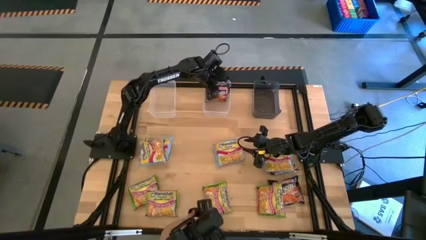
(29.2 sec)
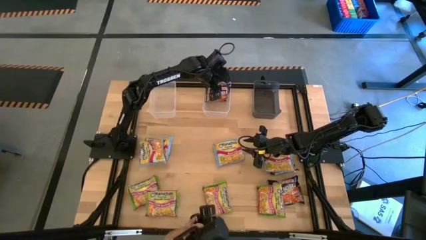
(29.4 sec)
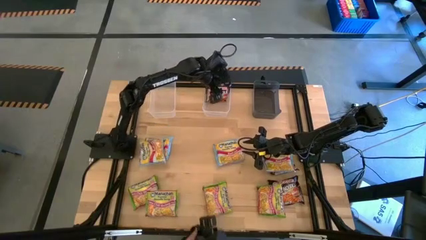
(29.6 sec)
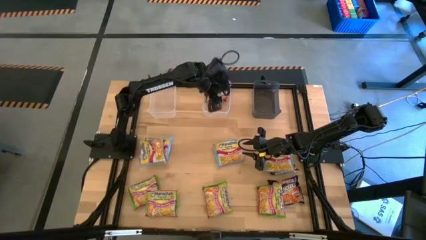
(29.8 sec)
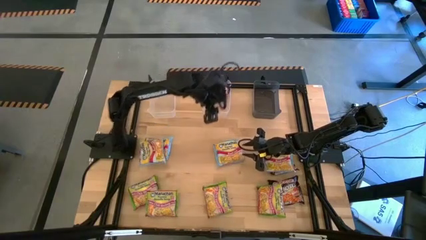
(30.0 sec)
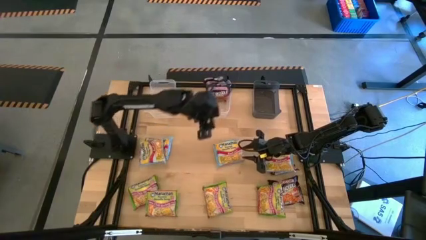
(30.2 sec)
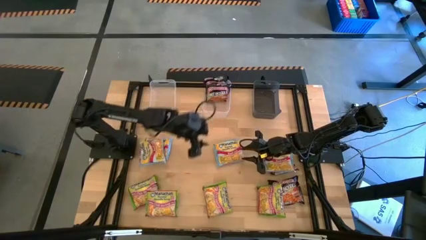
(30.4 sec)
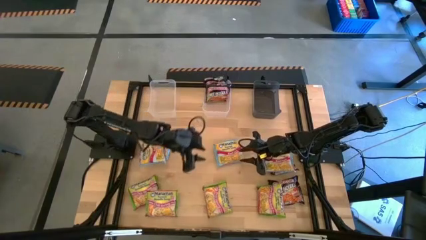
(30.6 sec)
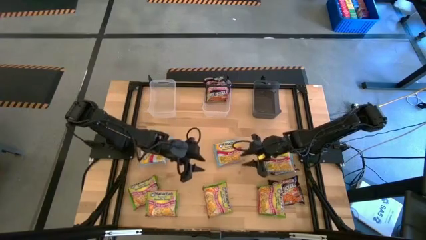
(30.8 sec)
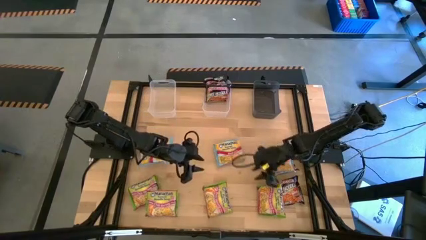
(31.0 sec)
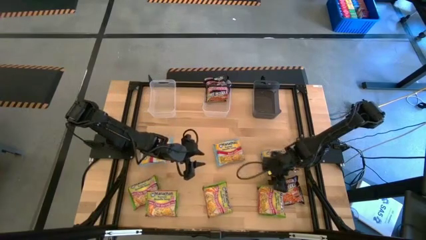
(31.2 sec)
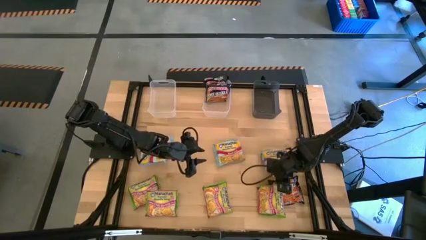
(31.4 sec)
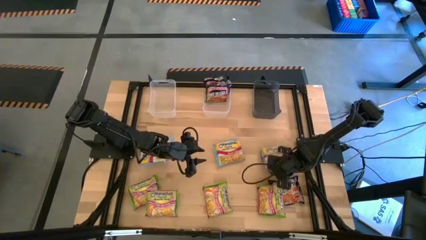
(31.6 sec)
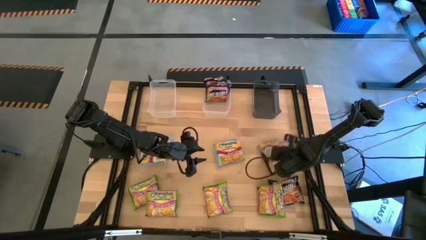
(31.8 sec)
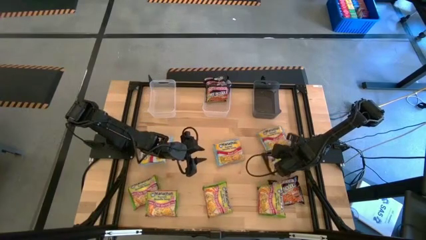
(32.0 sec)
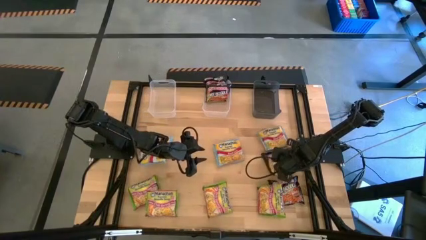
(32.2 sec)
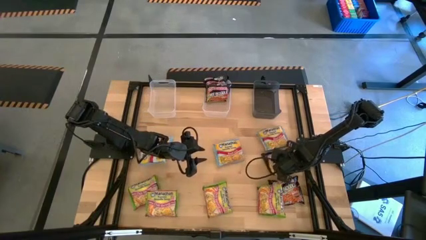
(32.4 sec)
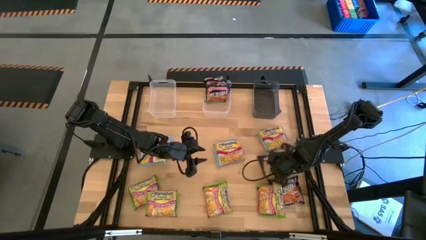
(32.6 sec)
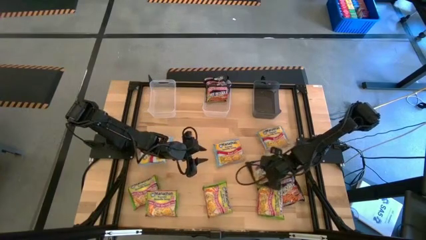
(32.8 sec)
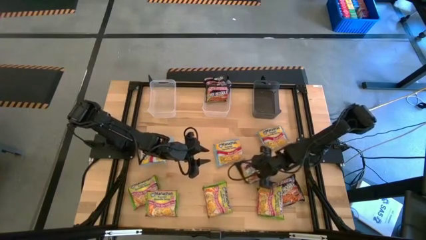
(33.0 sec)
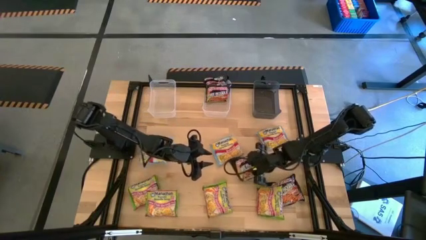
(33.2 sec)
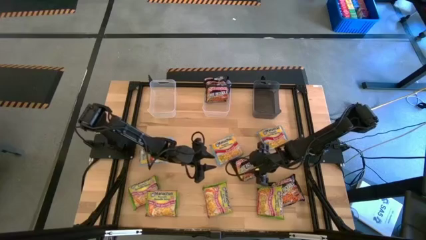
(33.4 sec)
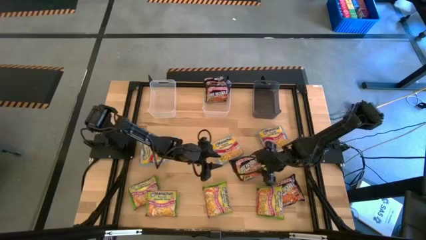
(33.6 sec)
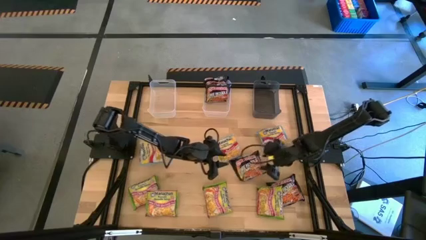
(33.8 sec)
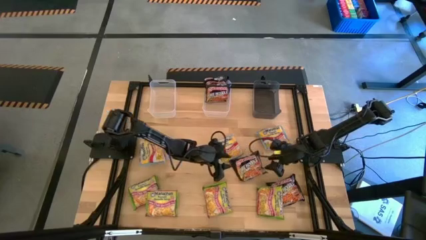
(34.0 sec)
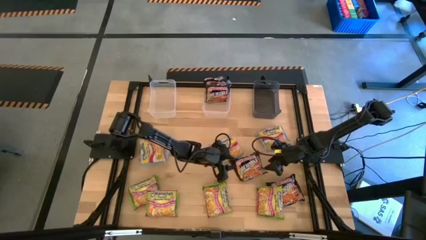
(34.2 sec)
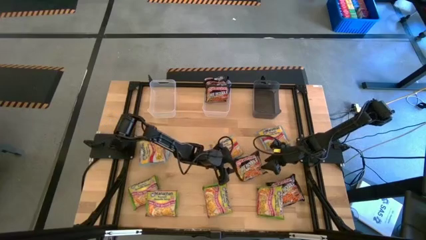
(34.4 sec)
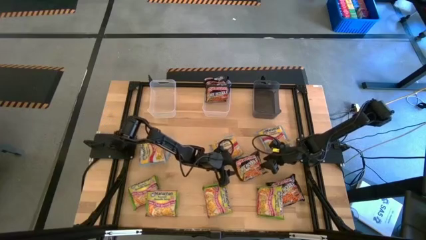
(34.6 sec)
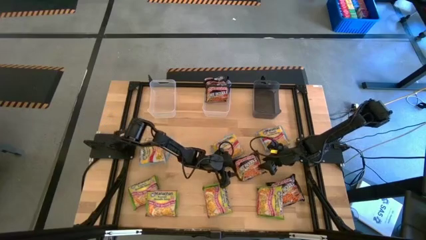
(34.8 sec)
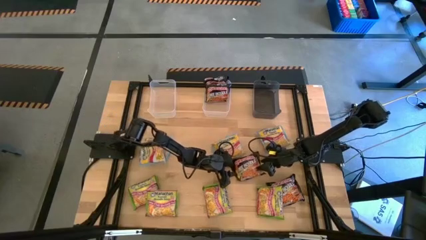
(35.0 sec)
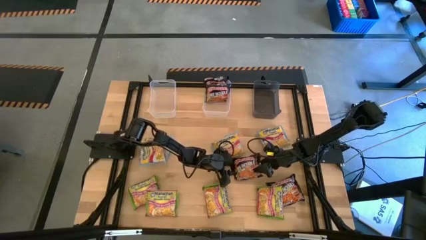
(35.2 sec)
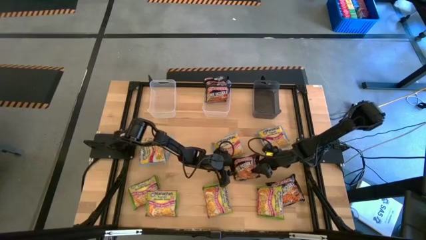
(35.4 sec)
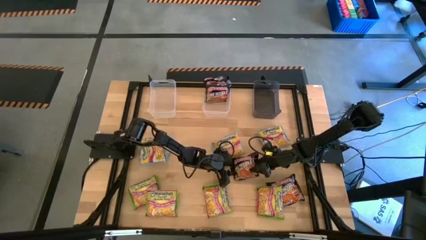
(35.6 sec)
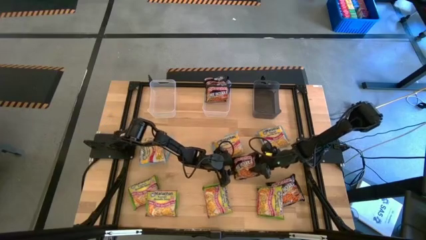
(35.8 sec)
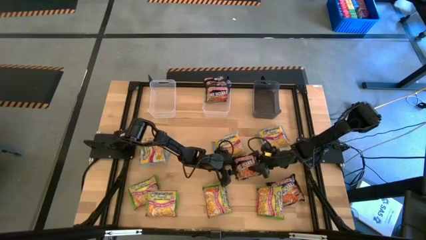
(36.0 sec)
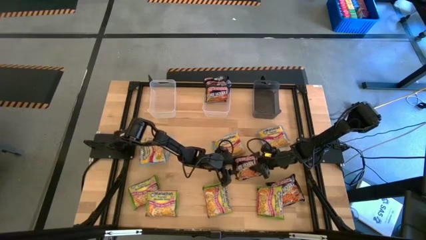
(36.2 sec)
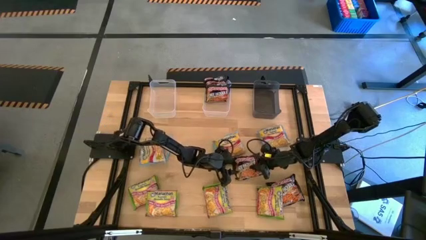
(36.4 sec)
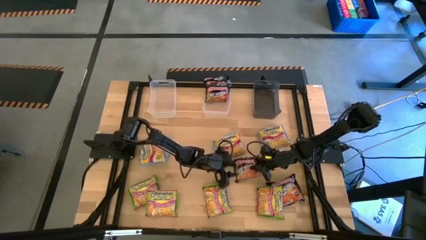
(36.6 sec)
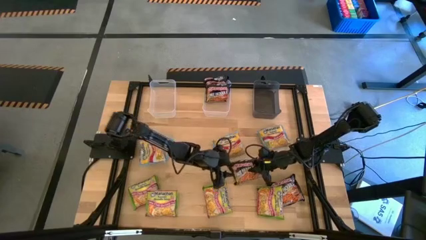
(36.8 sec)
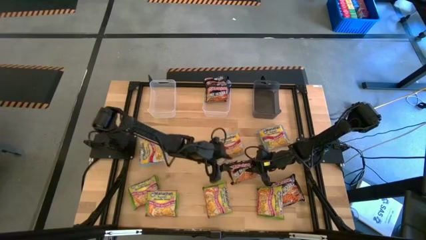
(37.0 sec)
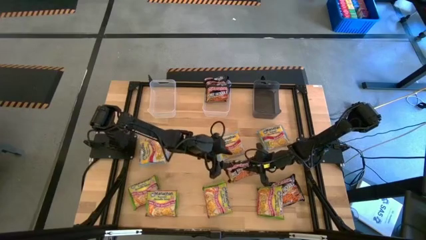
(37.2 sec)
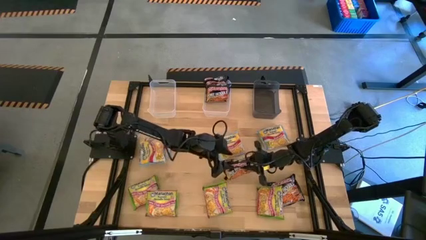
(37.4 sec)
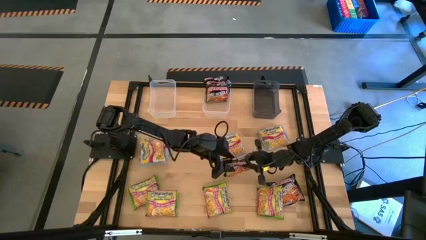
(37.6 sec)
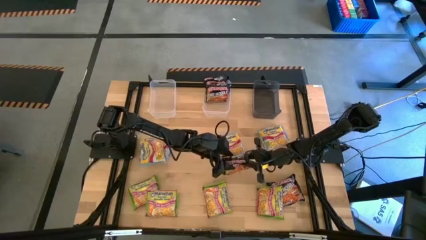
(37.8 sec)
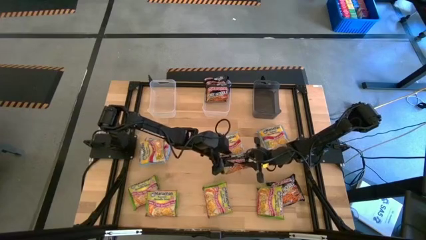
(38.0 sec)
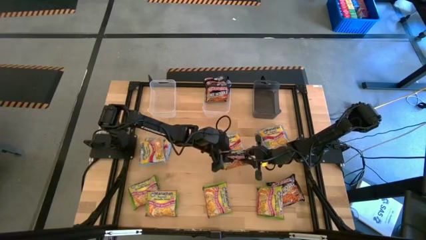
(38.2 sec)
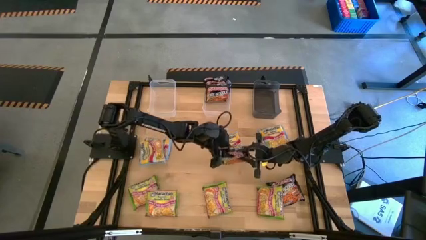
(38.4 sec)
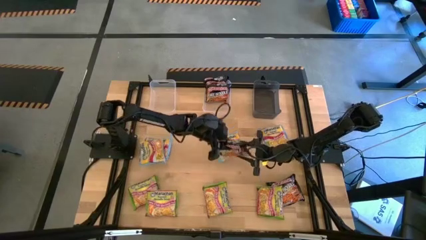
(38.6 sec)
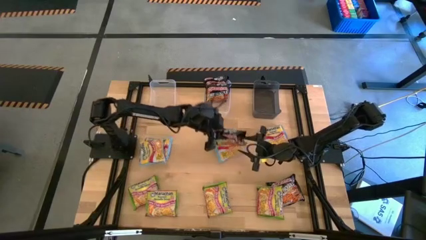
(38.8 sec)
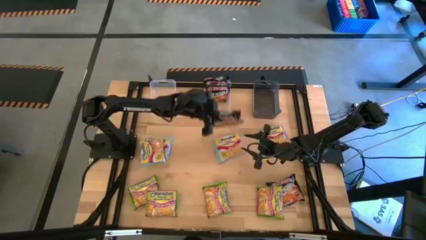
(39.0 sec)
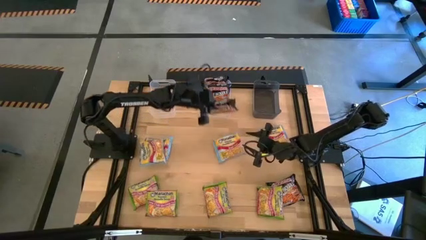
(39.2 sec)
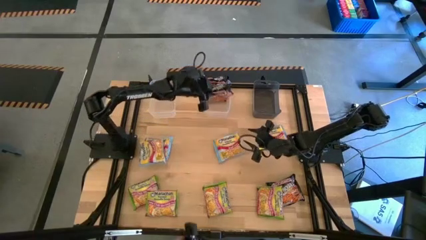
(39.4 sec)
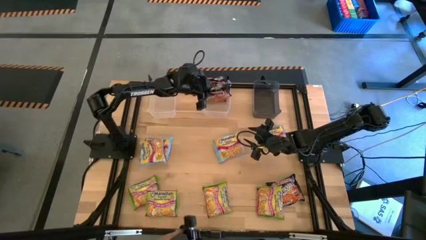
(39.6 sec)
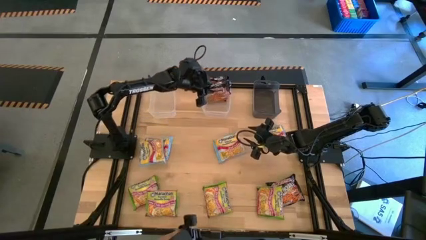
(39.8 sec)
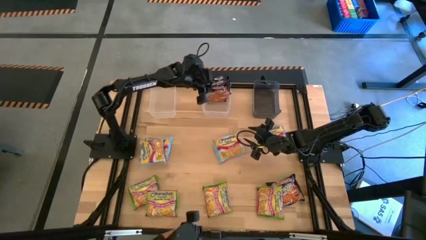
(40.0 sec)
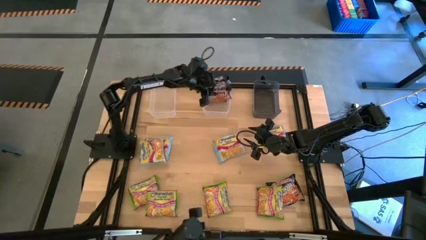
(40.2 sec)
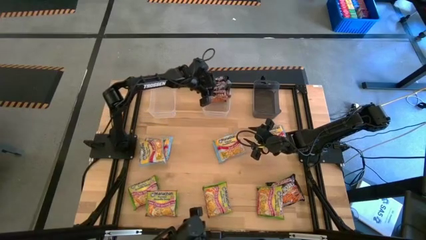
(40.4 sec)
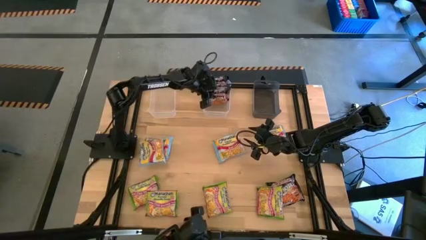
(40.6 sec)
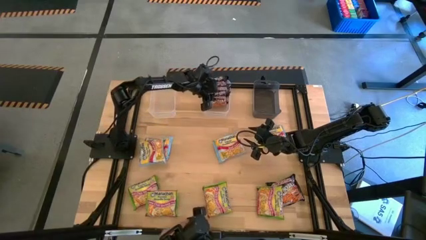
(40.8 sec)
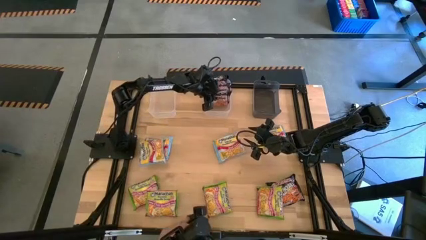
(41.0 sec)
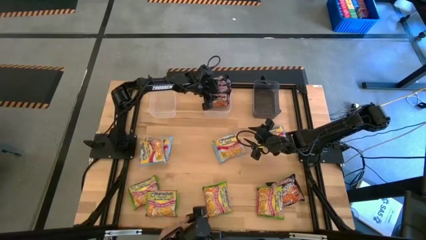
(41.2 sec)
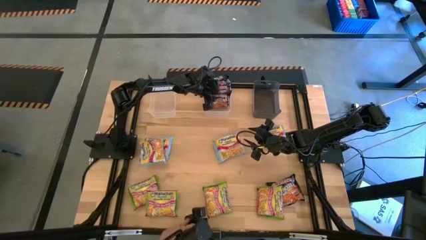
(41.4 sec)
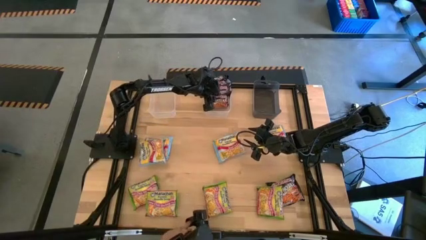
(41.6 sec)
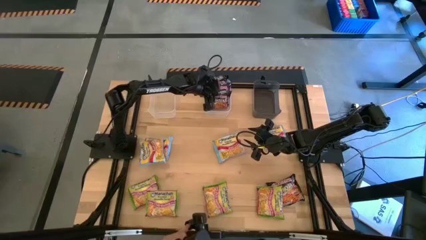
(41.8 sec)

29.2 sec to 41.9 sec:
Task: Sort Maruchan noodles
Put the black noodle pack into the right transparent bin
